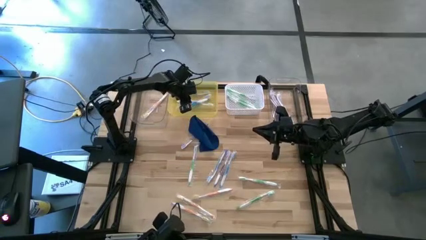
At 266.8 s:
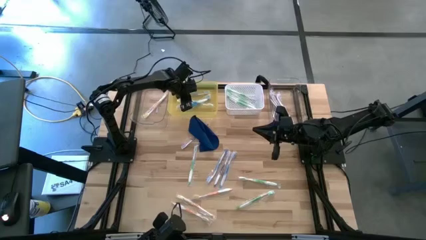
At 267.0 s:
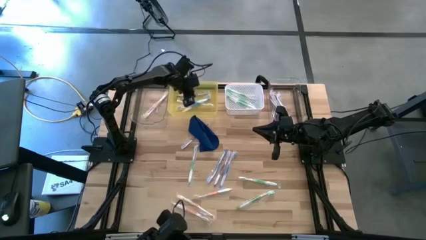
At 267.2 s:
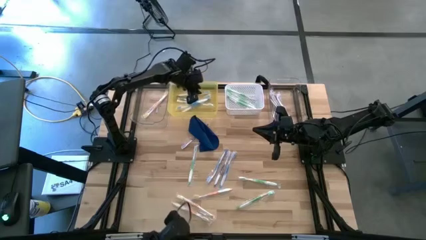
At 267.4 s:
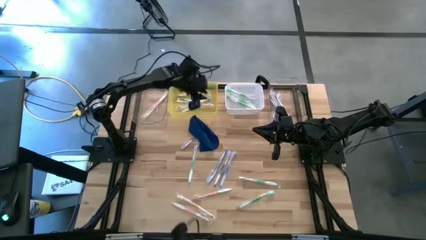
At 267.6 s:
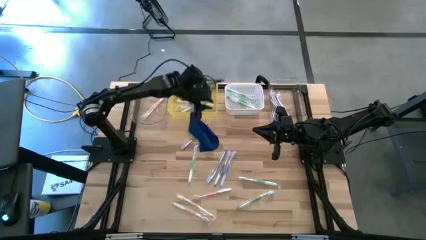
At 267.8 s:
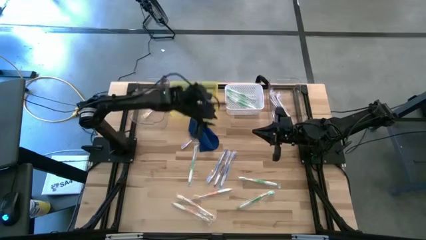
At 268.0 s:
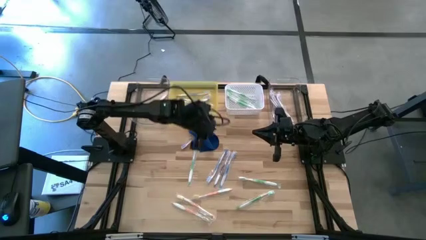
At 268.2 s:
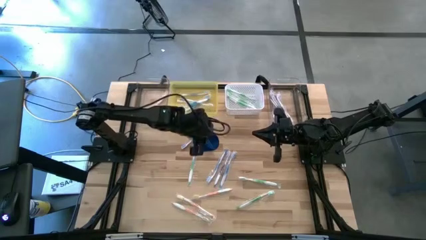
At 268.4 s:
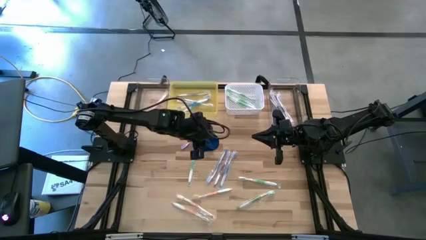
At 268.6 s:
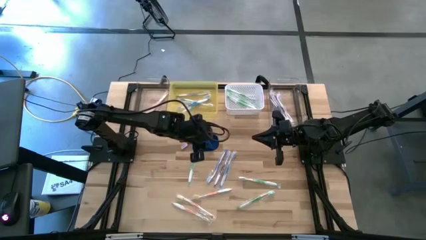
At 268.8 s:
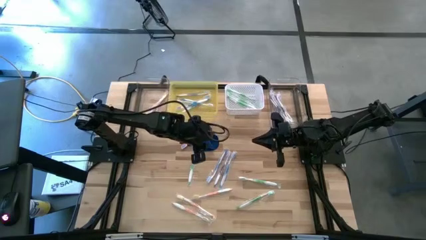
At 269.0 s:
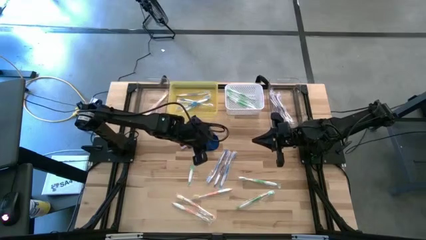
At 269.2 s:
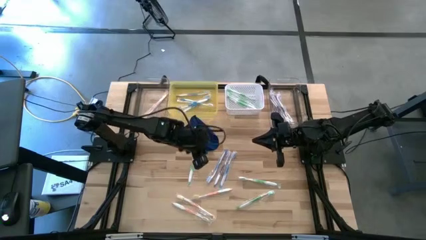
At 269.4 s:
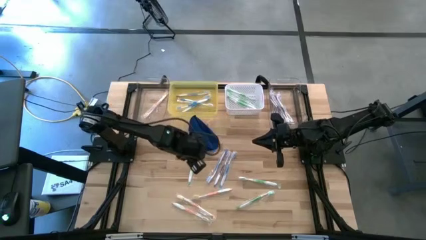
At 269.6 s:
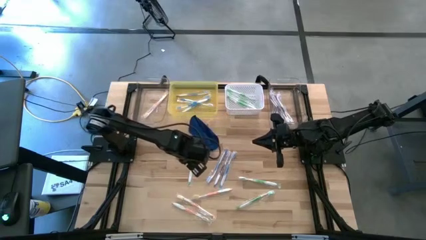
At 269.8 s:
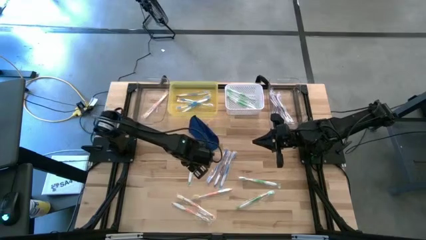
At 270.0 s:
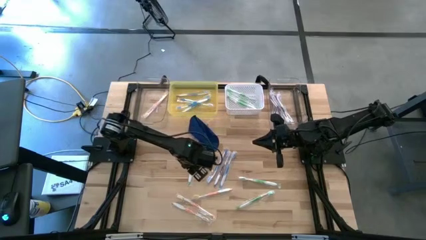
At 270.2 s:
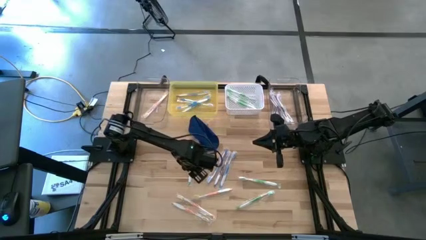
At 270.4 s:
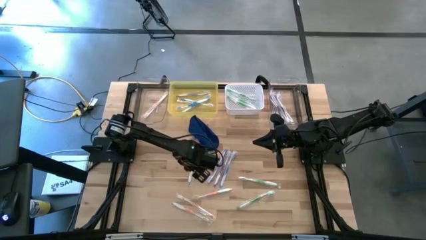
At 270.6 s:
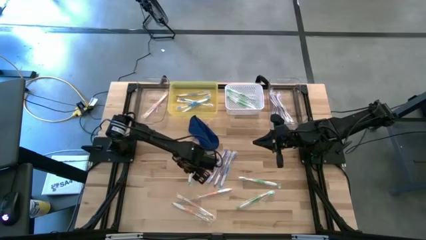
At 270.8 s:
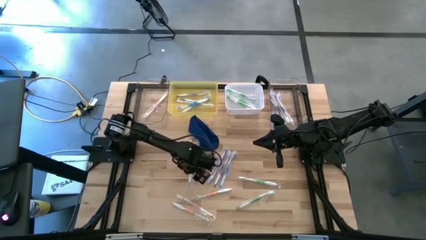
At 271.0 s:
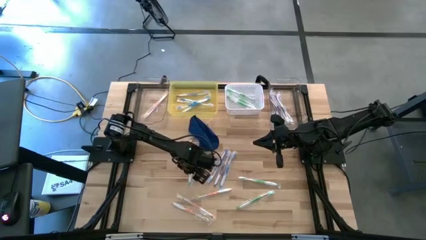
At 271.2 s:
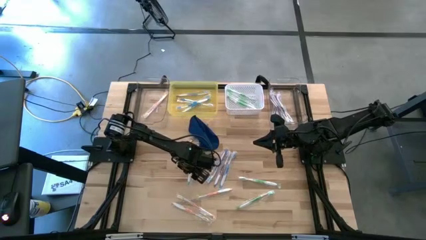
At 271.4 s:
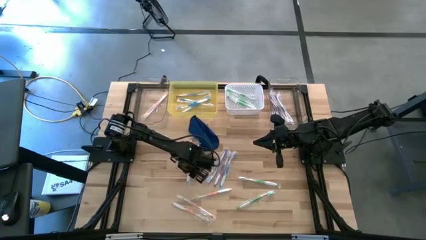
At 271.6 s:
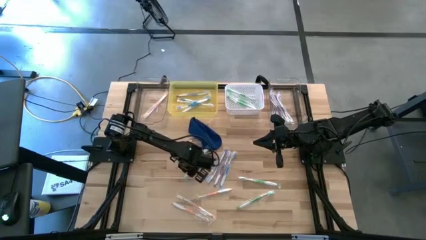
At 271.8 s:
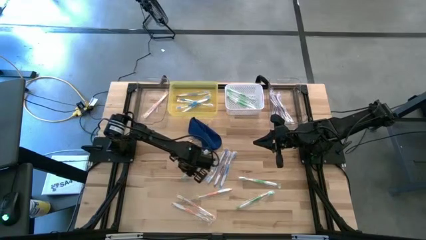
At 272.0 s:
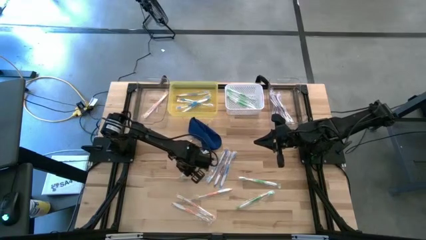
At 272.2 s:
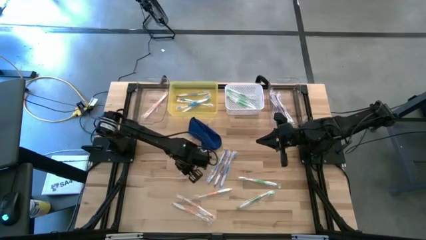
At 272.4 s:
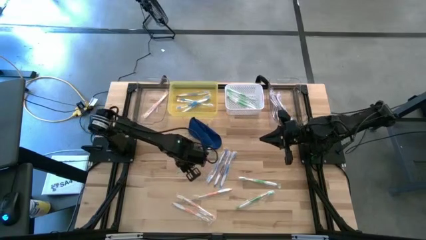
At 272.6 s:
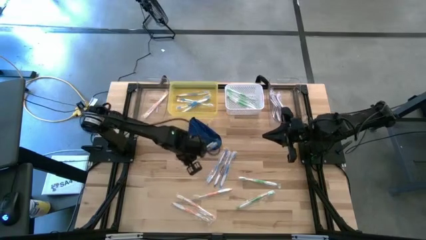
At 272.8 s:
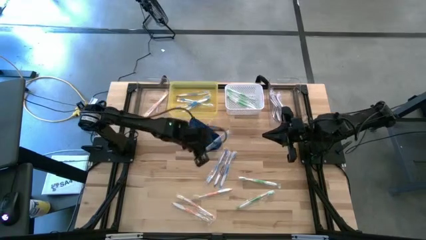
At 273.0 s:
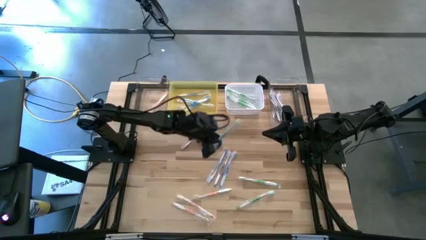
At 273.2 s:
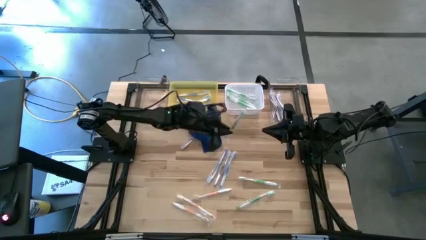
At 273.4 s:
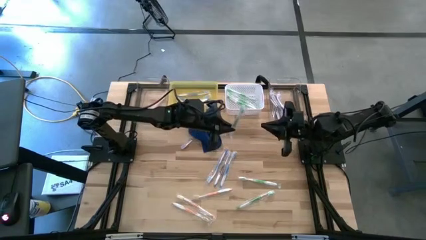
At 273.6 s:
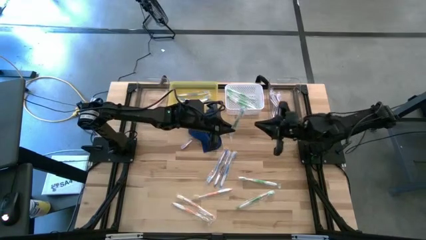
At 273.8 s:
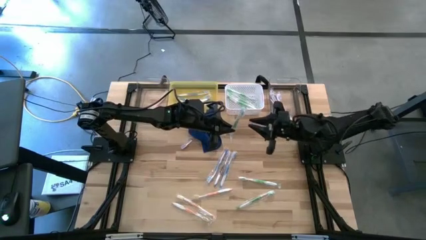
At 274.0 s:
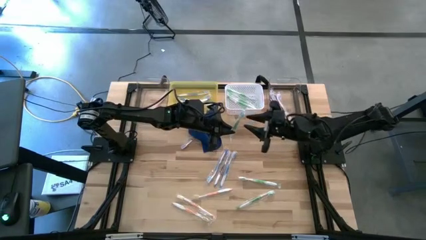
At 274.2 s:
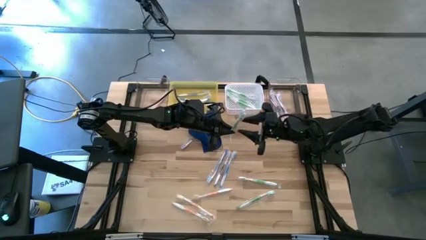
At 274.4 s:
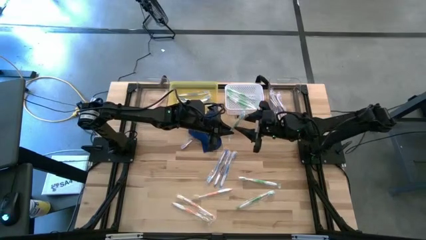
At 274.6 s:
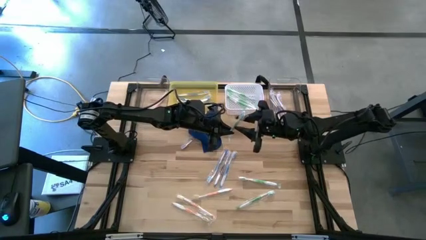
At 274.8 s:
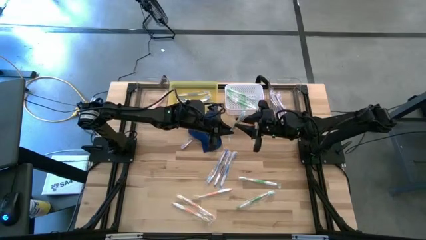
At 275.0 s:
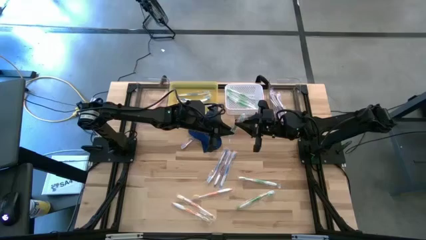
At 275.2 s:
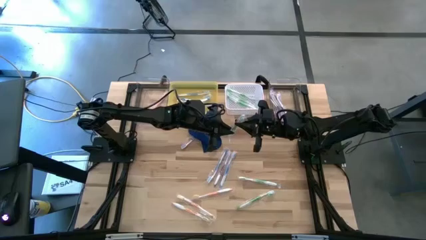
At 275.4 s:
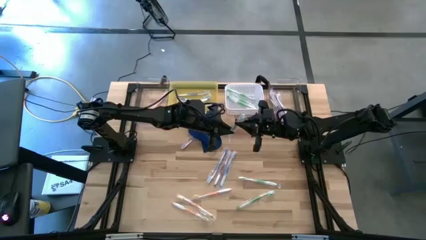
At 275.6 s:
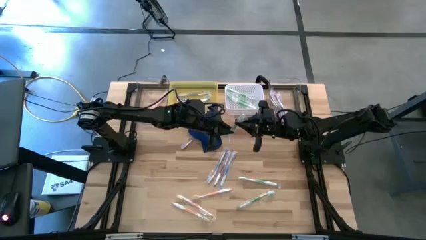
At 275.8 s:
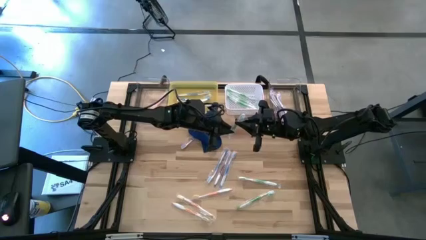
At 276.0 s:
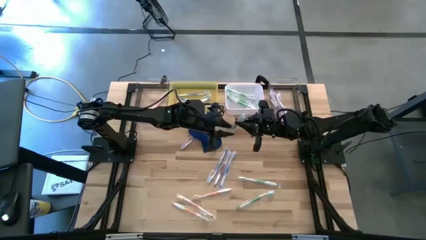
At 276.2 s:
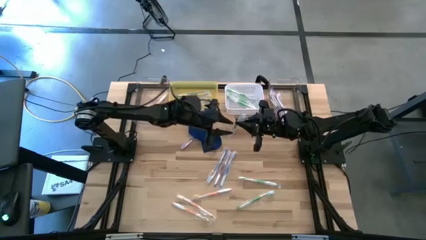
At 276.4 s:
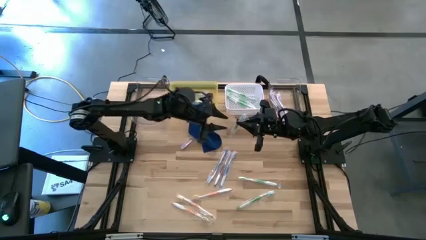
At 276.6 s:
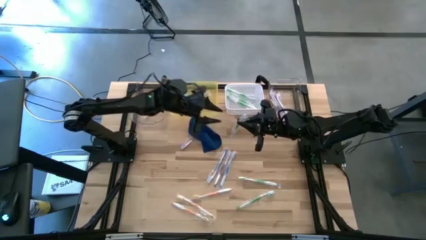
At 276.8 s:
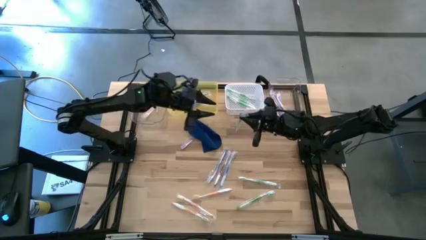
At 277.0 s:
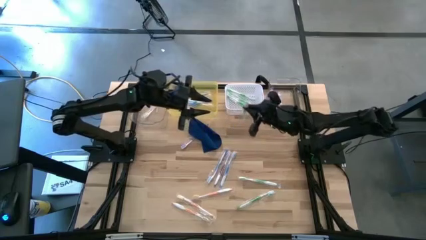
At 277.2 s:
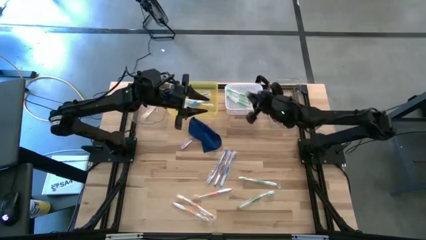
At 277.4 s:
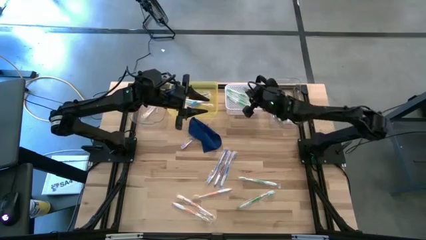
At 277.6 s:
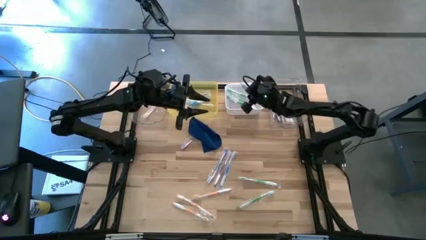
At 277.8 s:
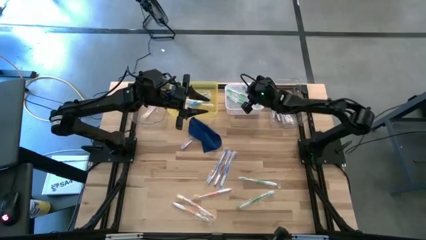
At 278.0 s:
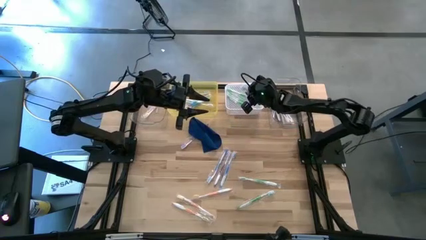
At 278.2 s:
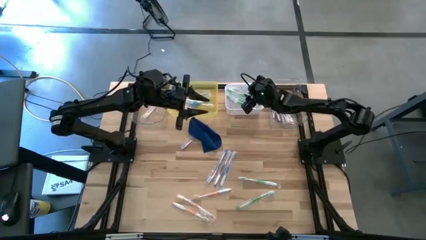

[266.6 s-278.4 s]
Task: Pick & Place Toothbrushes
Put the green toothbrush into the white bin

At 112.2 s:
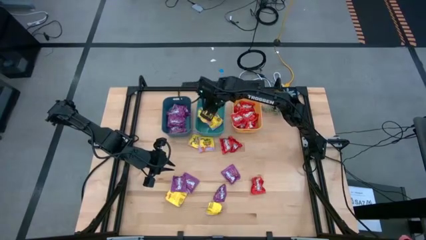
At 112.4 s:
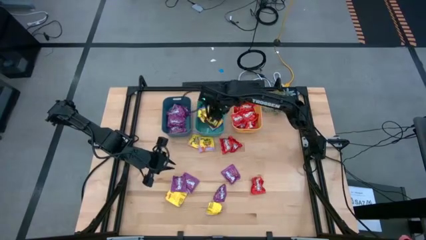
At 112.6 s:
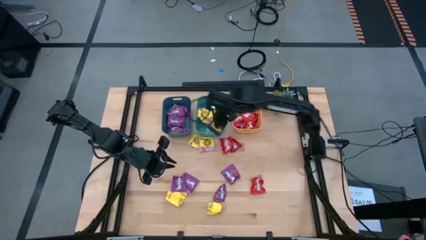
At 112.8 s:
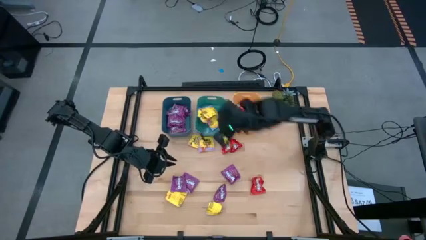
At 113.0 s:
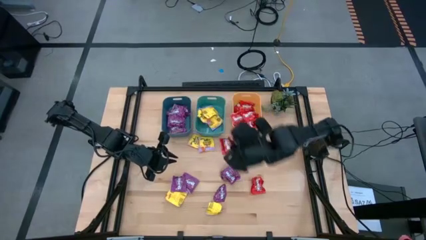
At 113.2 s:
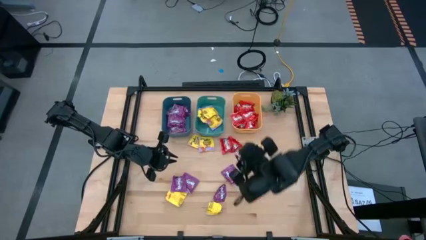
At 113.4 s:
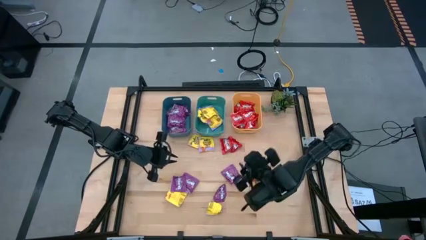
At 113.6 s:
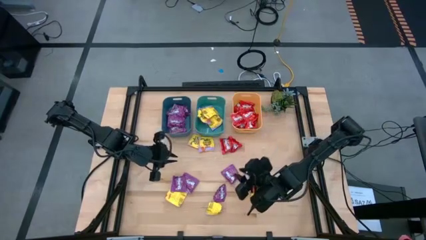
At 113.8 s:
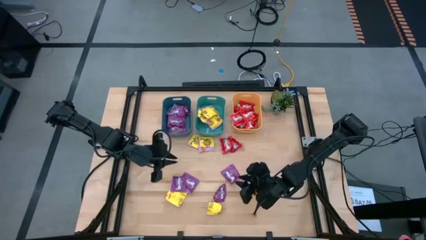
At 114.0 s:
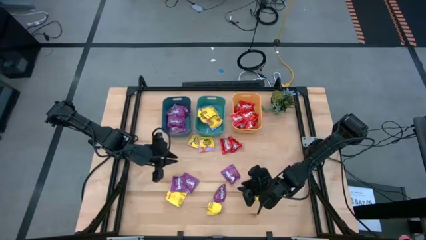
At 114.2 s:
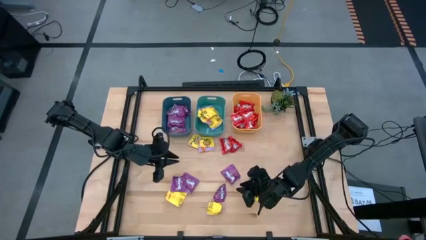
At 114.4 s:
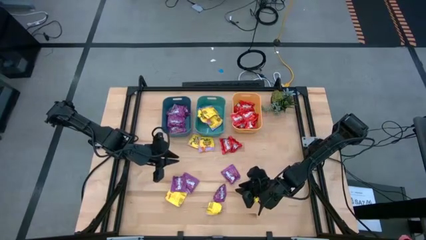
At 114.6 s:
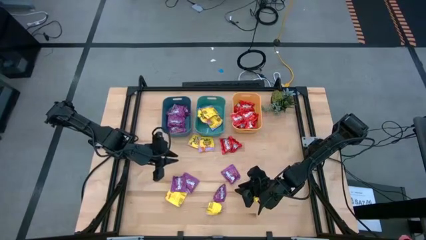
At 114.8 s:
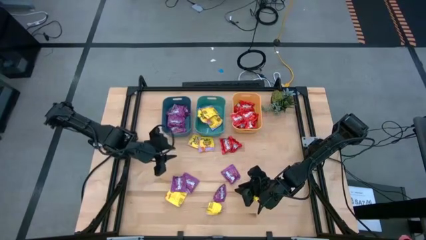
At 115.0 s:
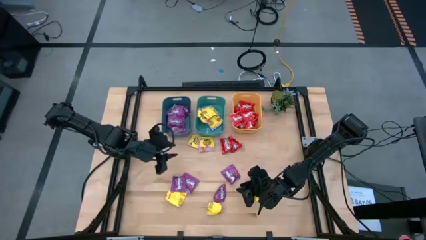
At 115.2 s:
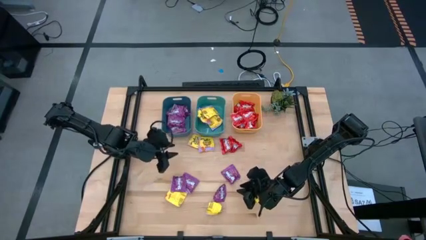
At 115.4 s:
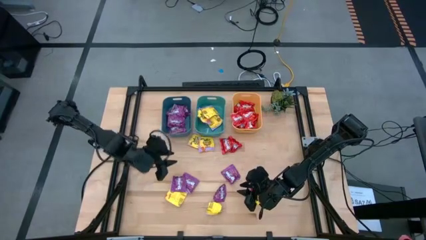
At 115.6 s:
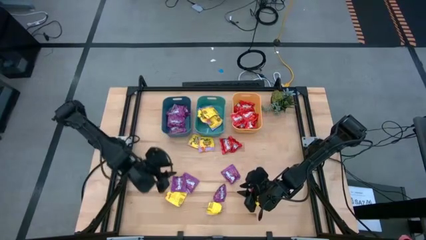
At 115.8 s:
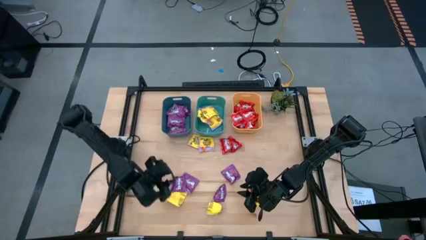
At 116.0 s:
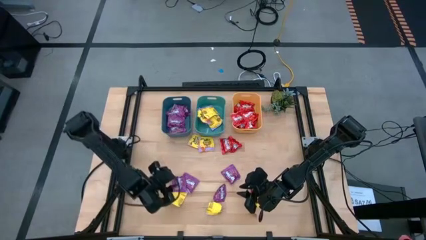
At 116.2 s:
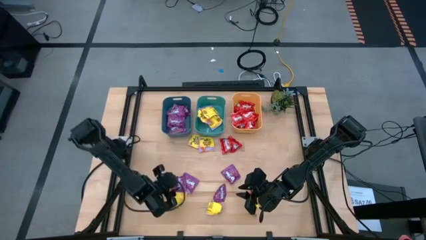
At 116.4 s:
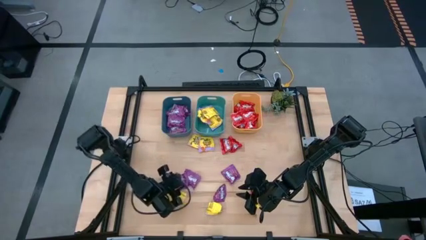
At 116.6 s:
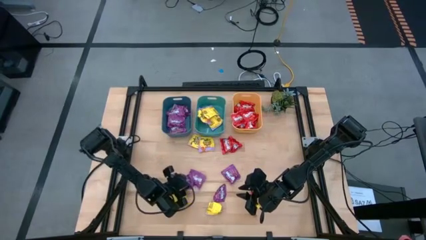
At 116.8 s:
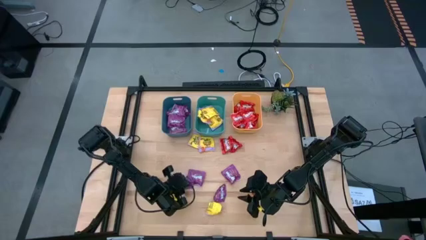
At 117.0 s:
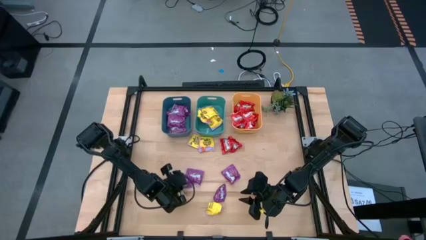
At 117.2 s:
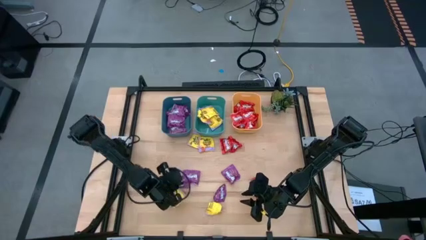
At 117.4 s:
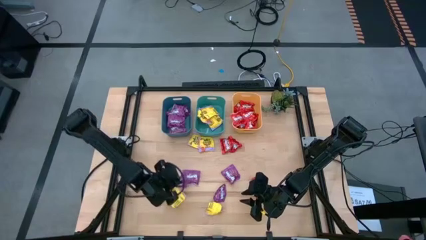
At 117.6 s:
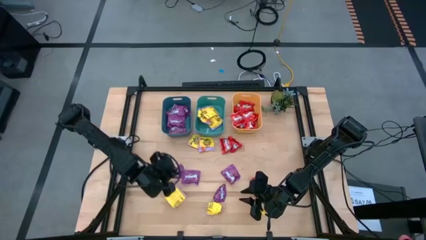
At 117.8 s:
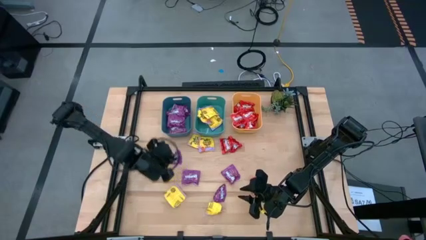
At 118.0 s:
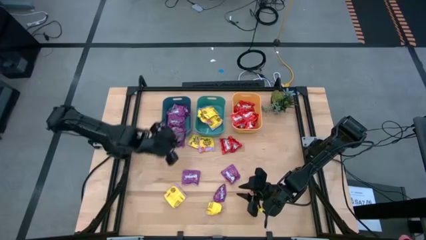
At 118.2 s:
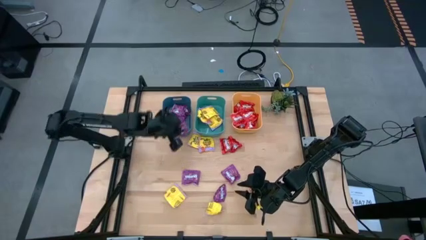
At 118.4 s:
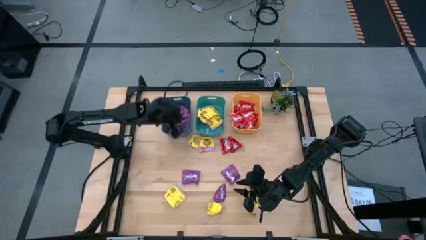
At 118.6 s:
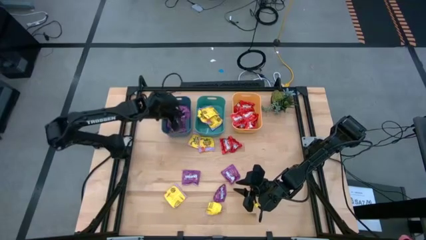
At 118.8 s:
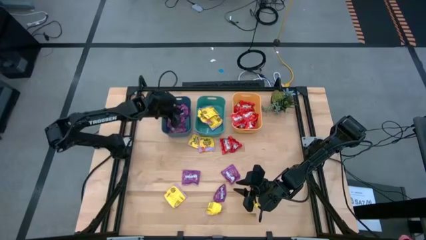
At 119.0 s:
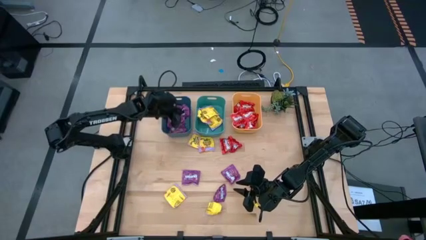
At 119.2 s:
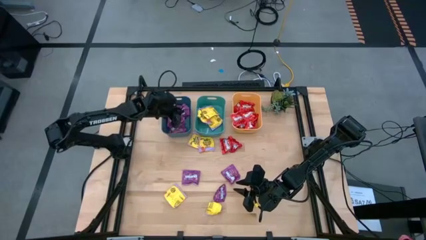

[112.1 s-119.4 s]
Task: Sort candy
Put the violet candy into the blue bin
